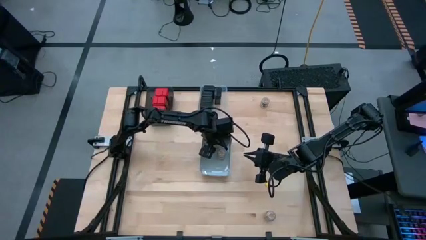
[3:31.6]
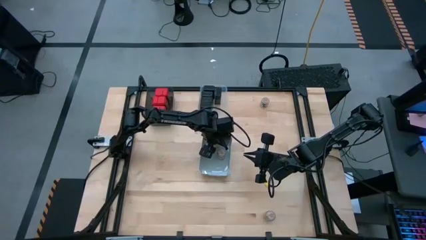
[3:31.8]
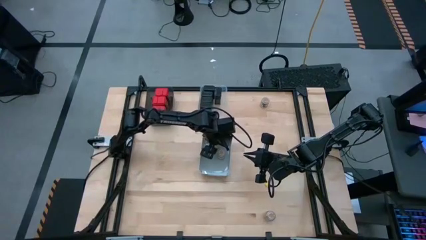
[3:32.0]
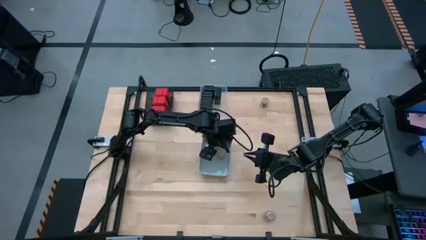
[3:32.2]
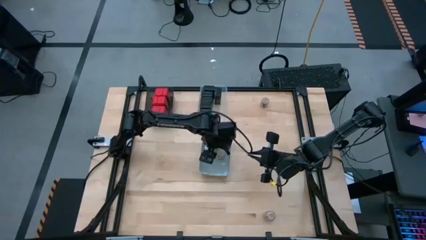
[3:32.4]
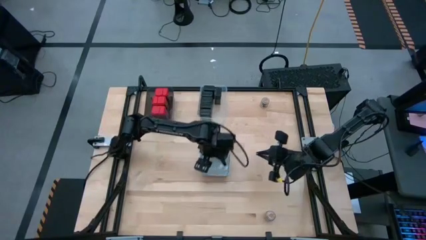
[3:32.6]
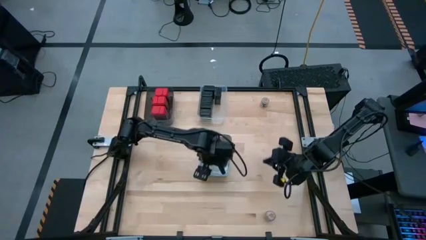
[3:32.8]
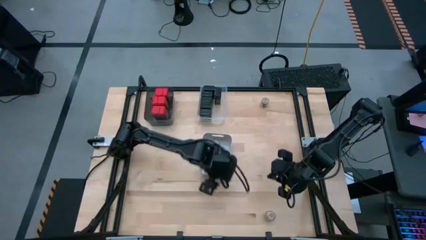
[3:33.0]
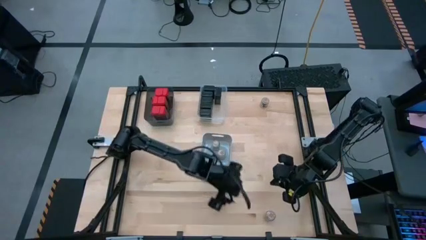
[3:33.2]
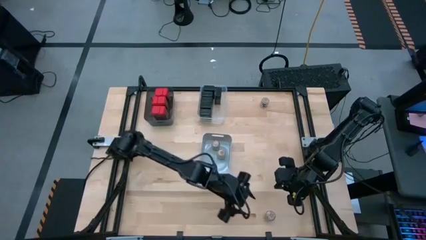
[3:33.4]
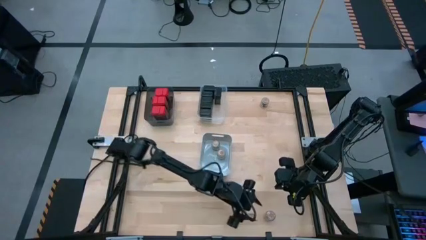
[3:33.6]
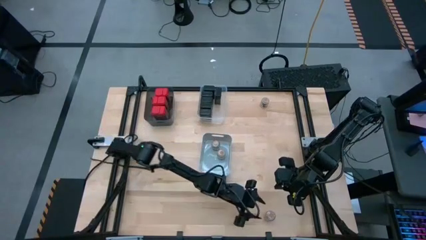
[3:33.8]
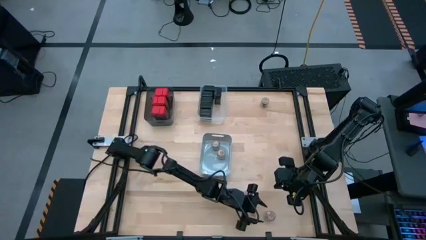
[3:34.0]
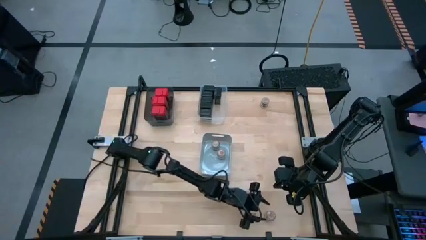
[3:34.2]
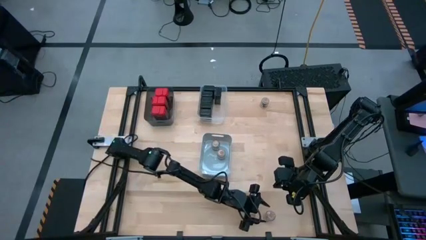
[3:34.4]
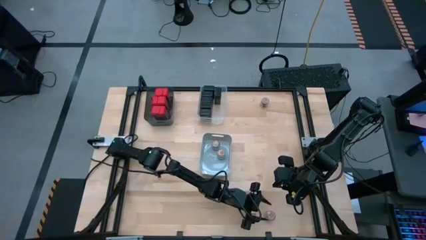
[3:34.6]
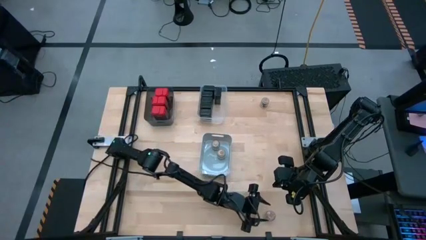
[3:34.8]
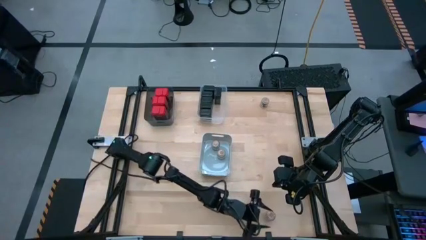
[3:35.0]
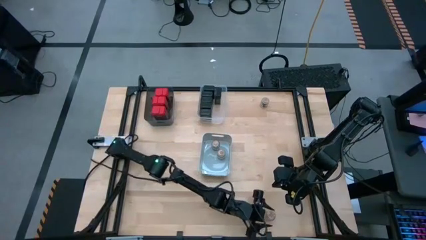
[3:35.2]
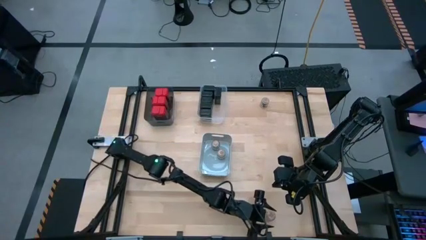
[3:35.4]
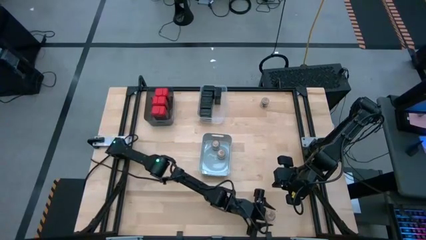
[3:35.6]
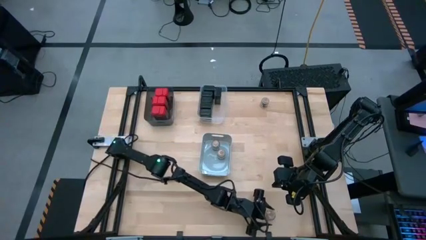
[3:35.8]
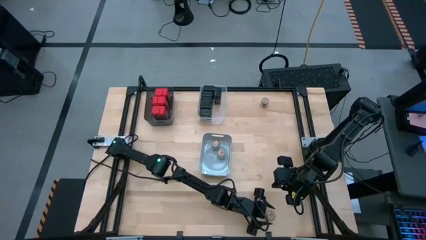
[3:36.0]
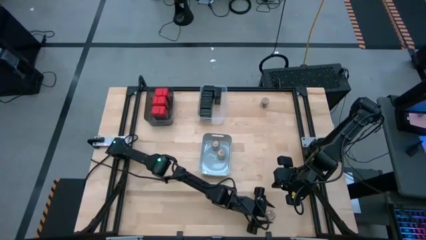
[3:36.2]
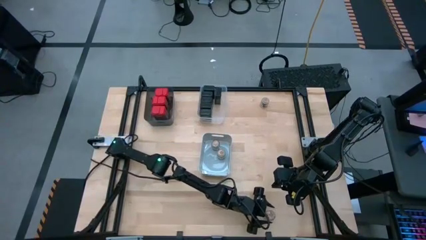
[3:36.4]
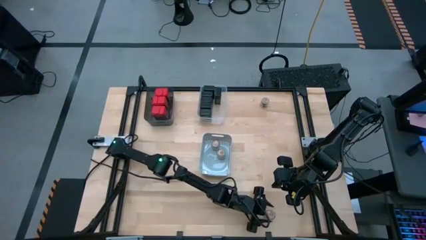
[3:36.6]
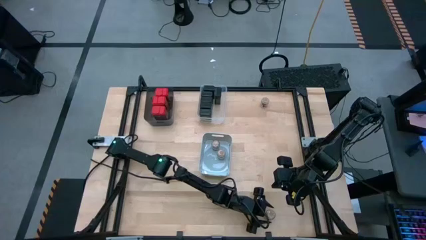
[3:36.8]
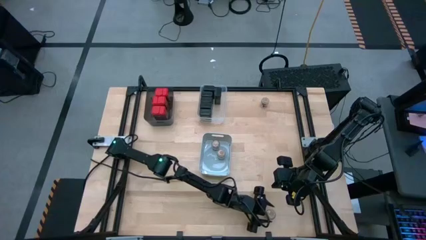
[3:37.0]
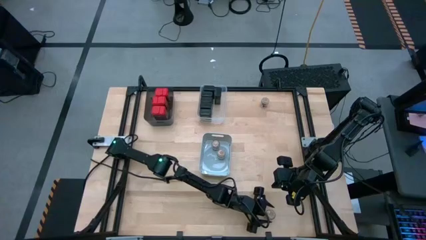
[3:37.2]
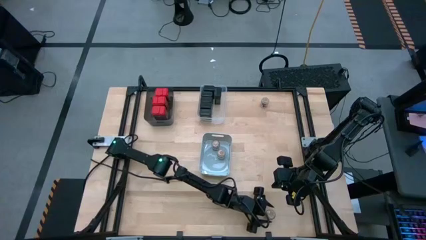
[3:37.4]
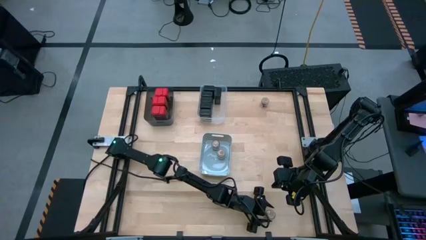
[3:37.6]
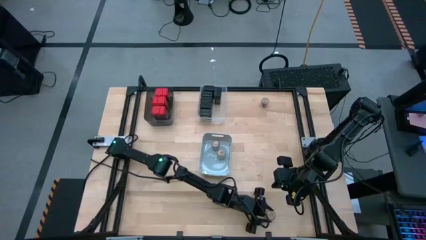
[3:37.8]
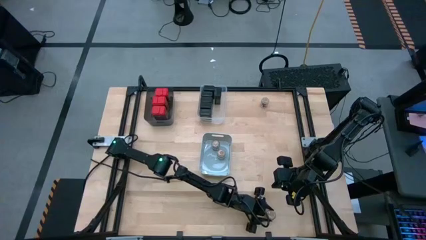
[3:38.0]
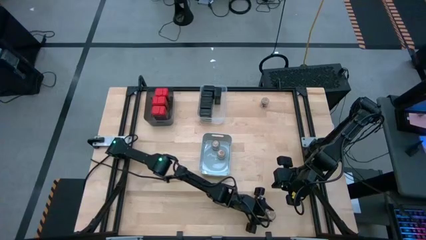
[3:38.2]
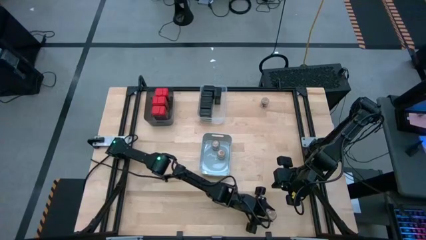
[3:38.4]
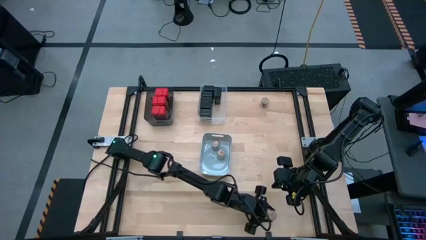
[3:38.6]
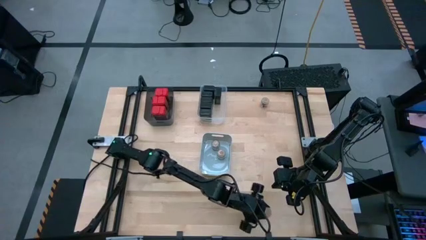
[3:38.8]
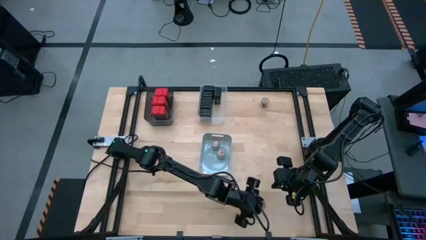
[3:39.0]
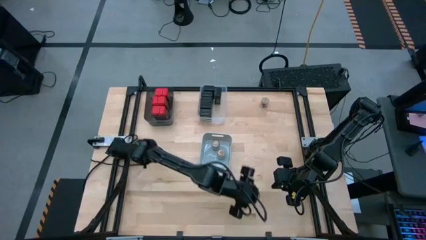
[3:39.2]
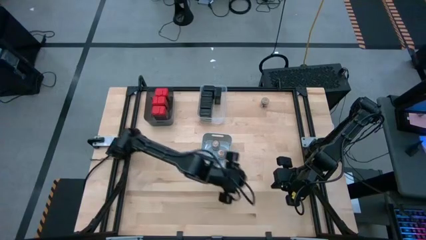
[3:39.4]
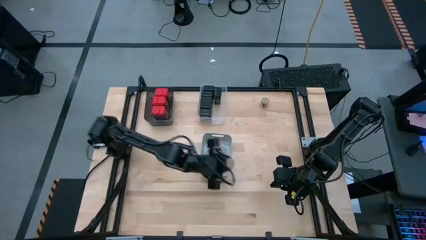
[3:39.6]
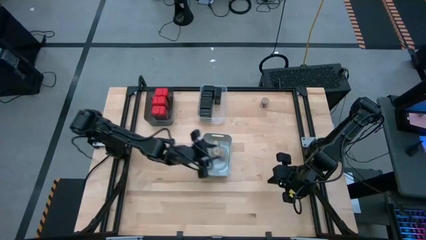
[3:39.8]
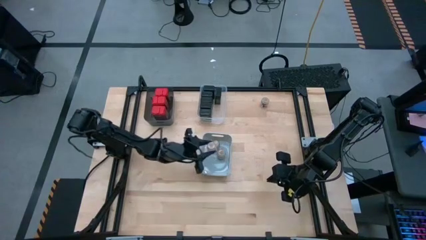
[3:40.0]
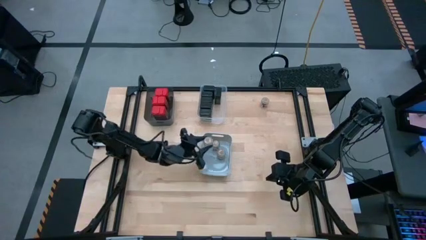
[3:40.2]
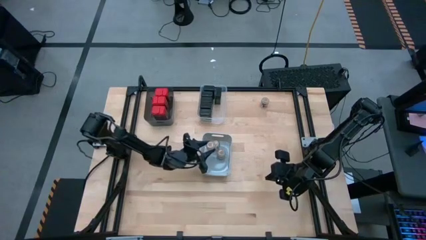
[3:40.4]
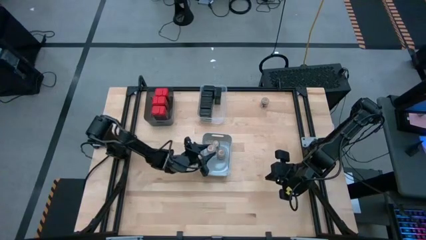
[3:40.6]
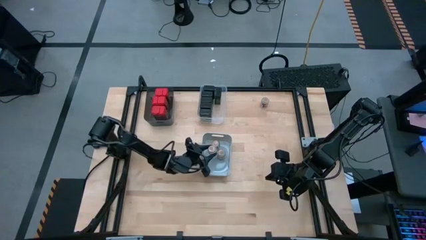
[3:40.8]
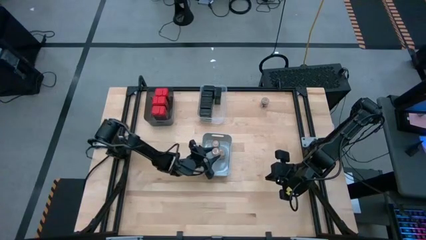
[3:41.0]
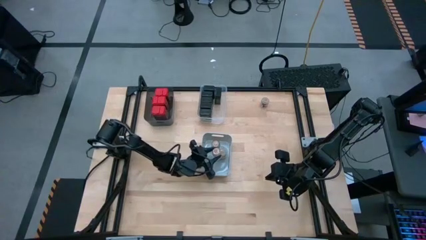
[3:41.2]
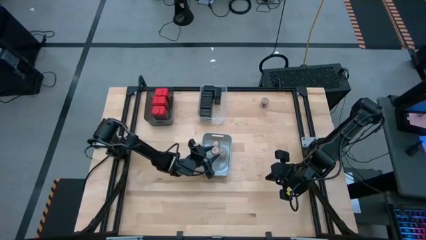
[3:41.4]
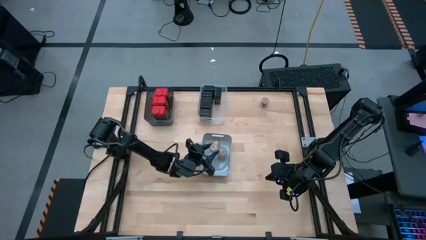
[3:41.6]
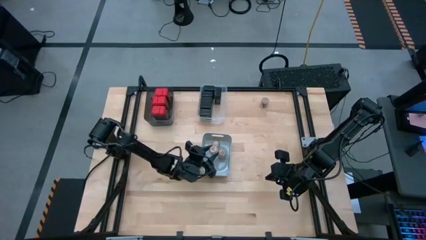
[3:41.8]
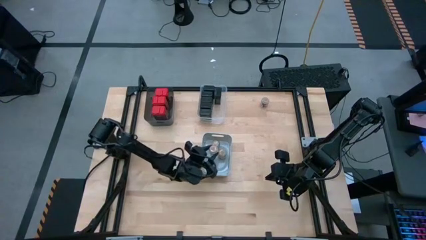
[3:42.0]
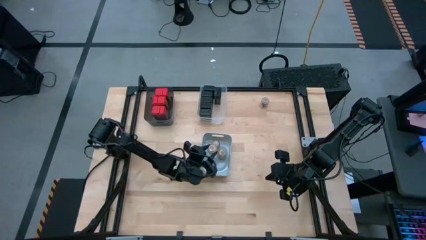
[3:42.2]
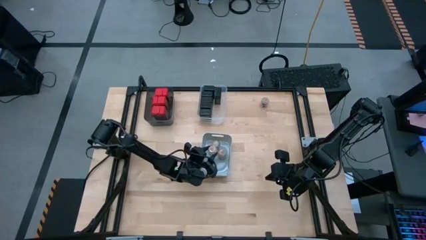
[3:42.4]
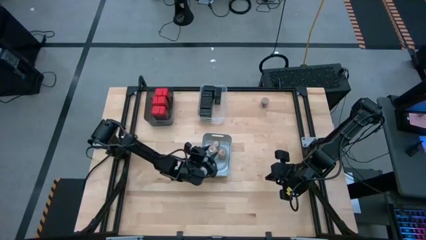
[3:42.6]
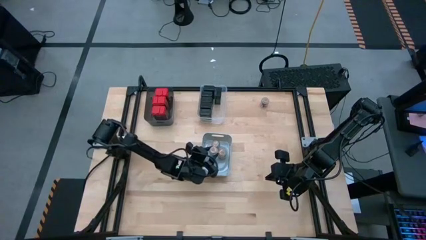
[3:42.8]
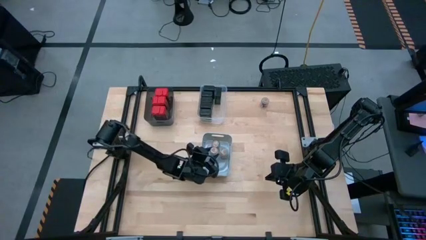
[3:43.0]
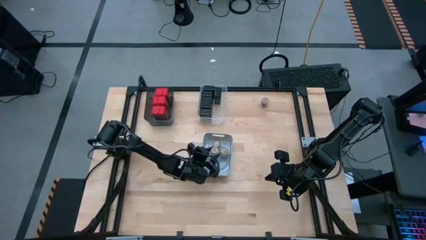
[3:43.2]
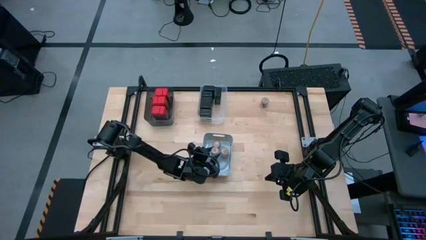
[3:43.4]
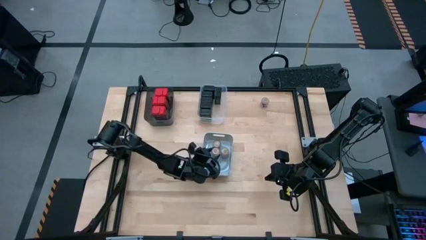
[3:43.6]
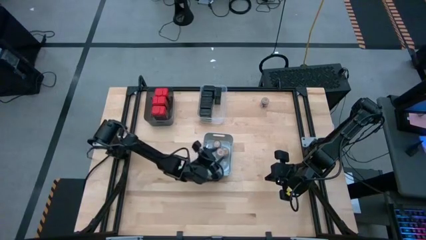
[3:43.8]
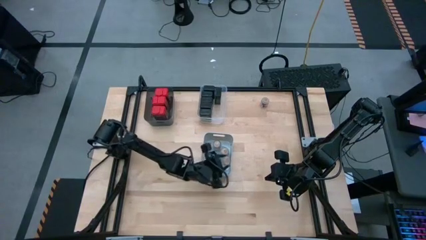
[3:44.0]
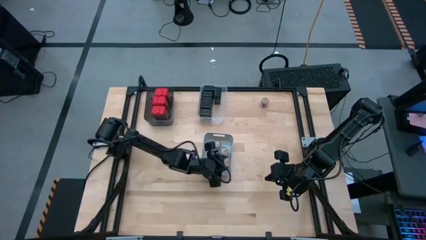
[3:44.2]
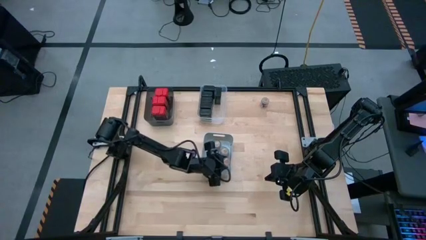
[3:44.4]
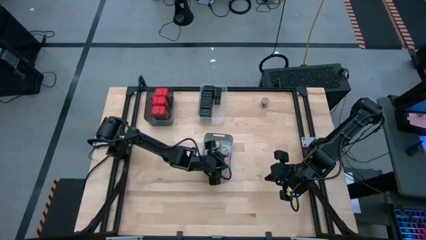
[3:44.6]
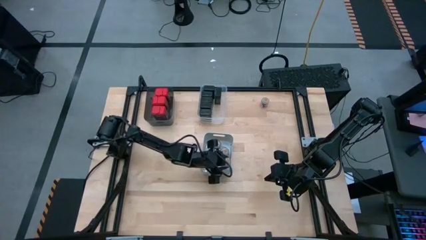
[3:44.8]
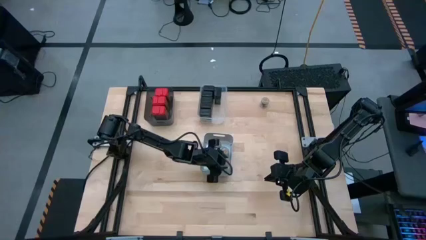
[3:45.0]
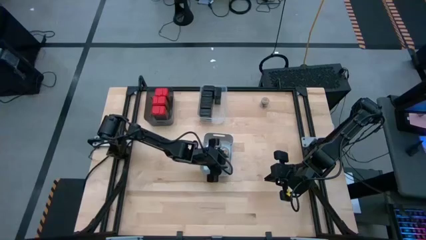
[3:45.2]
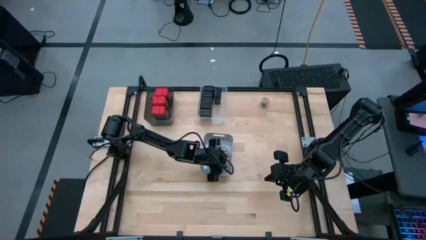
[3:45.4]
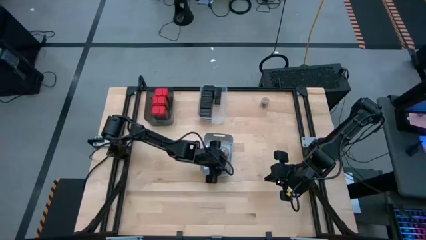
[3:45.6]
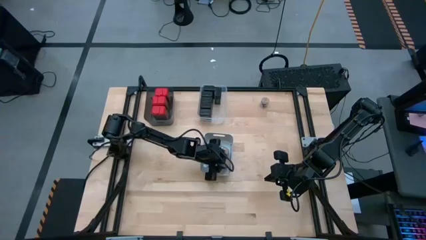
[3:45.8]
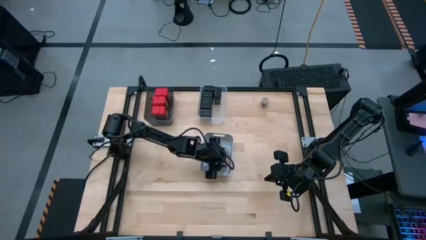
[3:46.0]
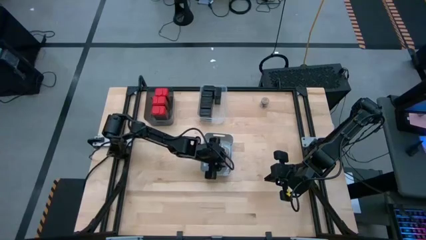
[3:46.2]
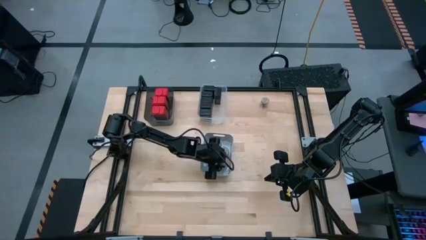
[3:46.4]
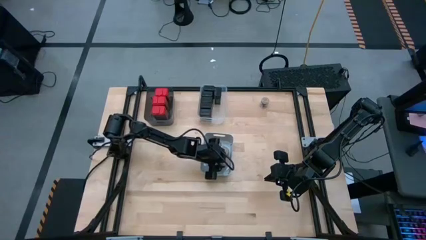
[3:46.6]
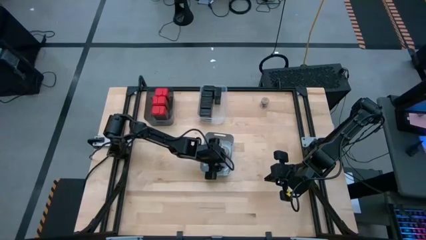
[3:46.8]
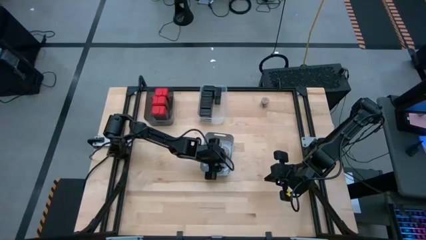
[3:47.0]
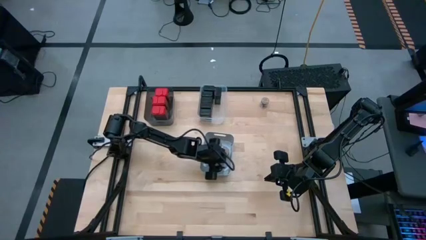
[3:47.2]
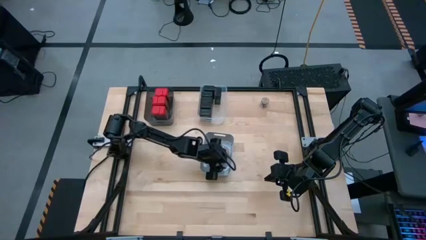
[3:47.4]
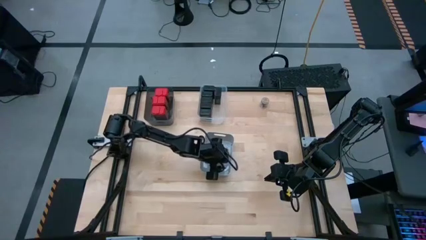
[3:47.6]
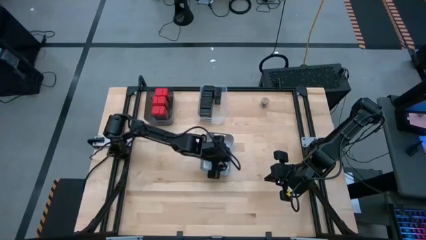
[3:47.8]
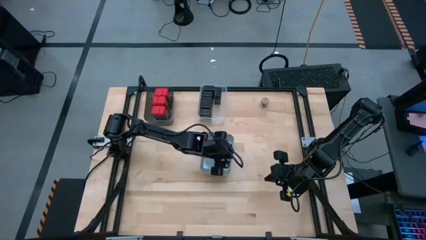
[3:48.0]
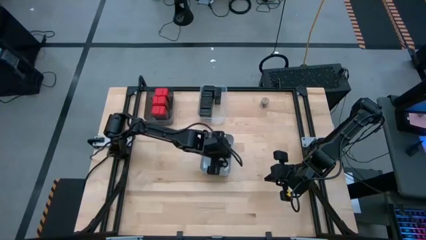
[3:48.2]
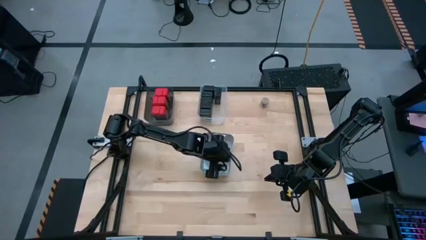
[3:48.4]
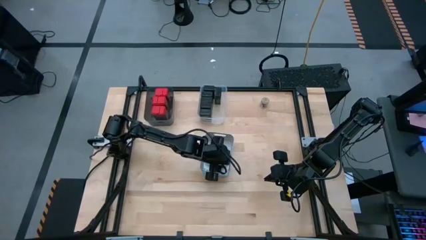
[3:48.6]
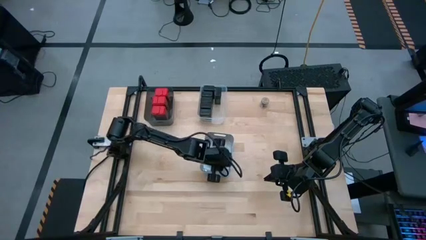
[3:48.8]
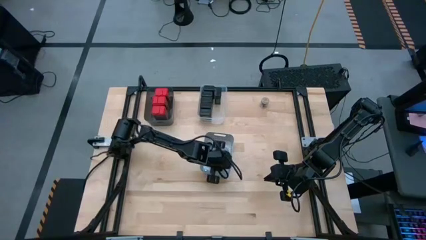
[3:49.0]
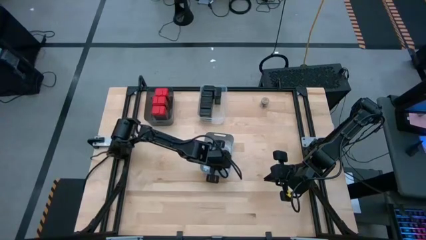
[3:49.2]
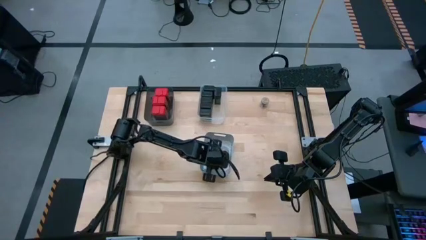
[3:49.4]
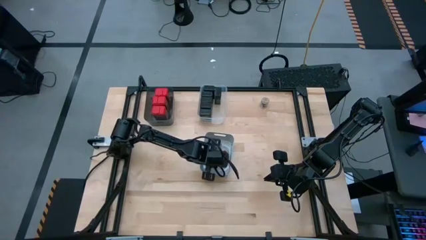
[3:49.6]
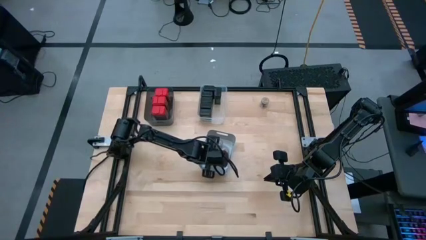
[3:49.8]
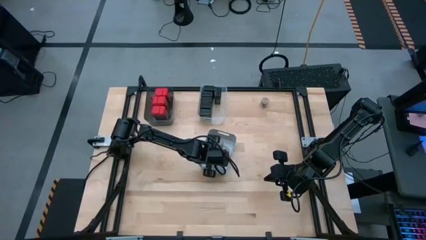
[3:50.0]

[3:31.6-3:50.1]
Task: Sort spices by type
Put the brown seasoning bottle into the gray bin
